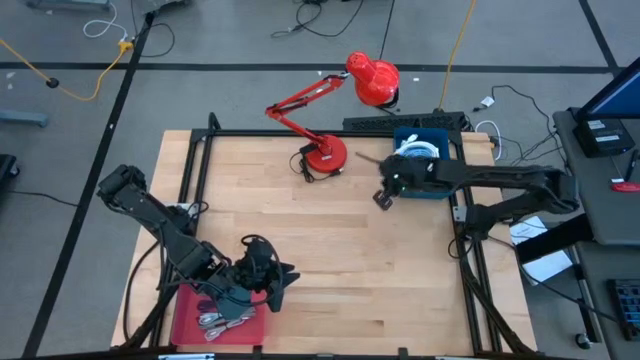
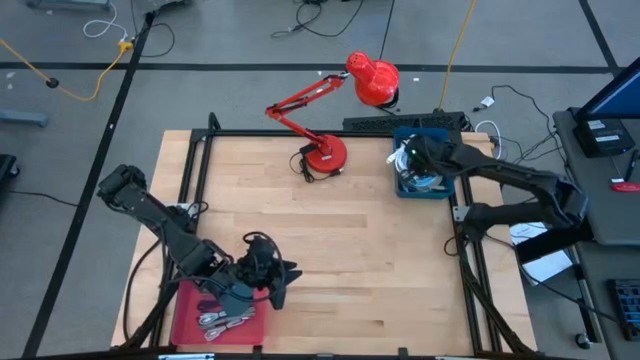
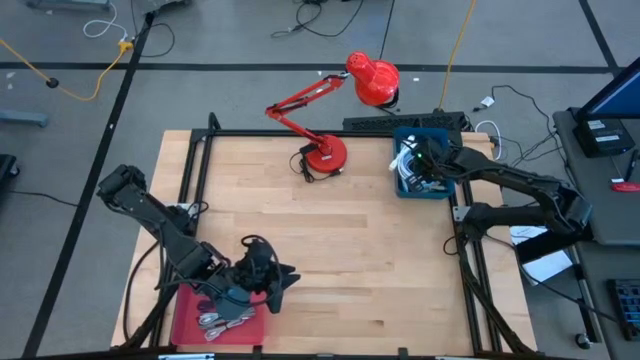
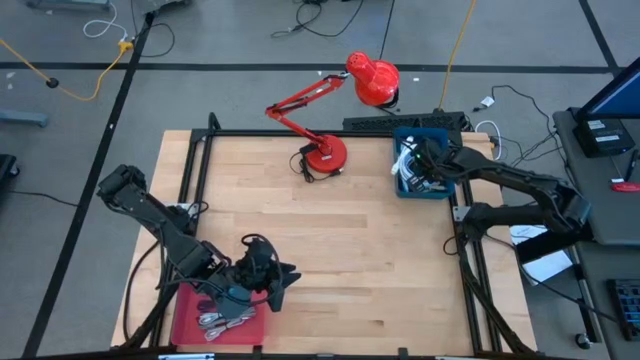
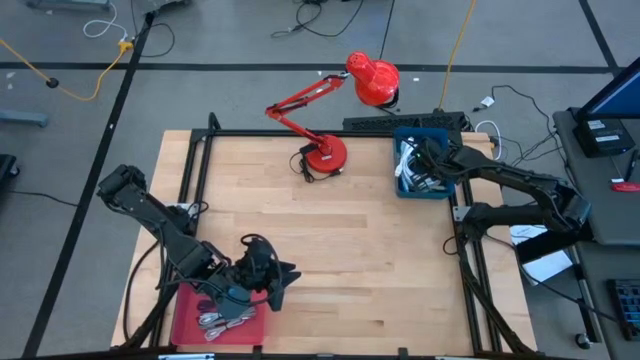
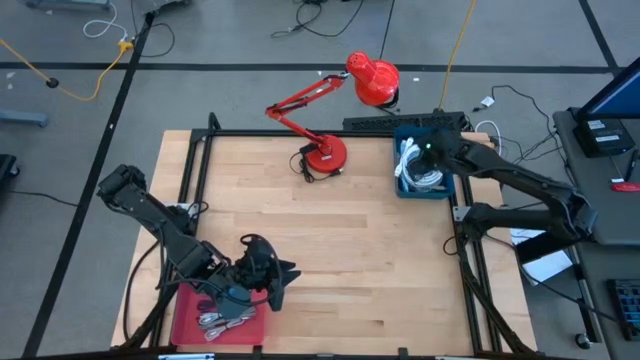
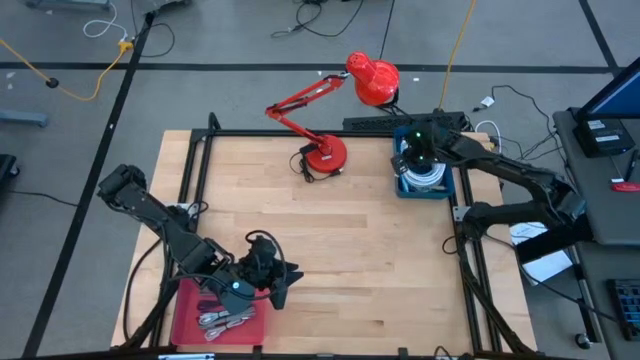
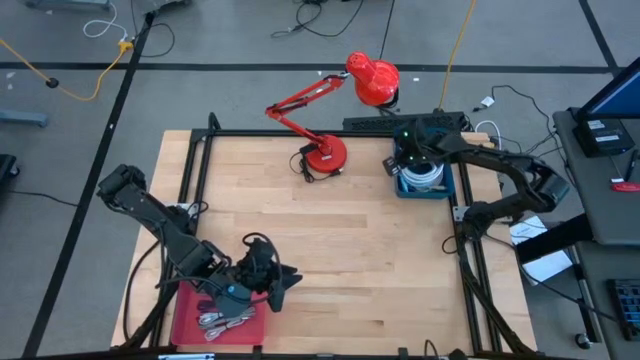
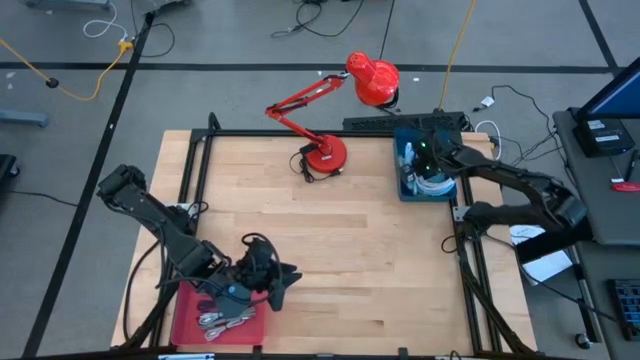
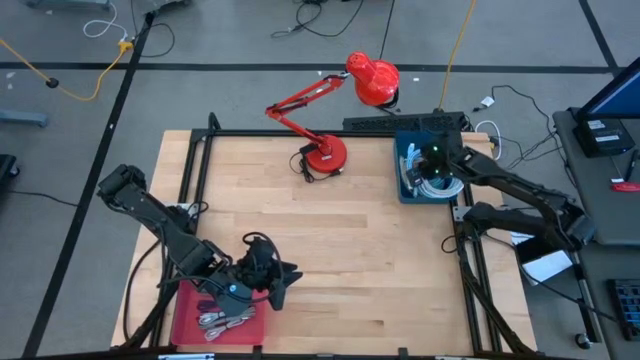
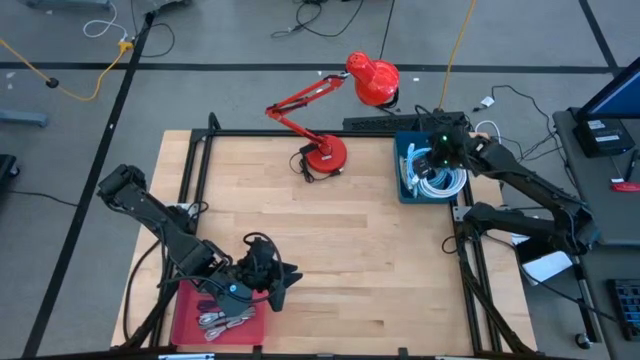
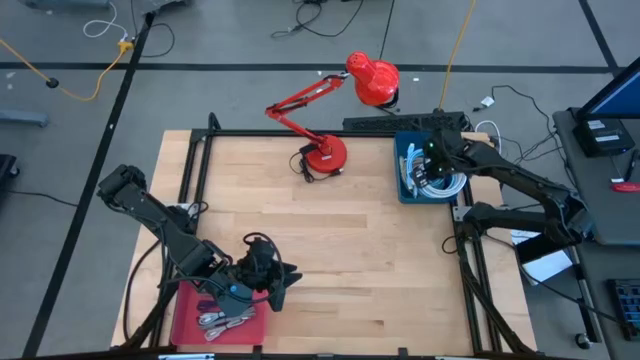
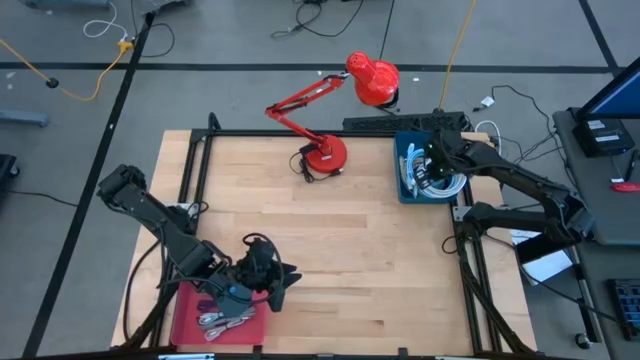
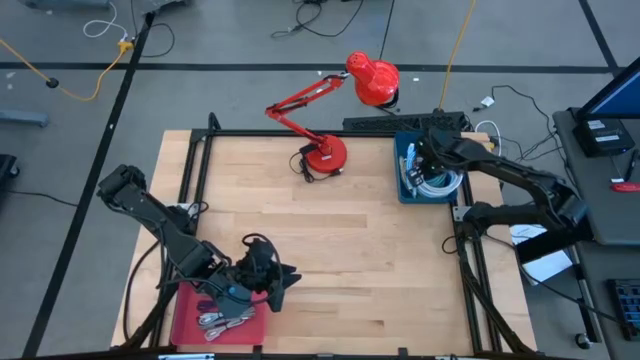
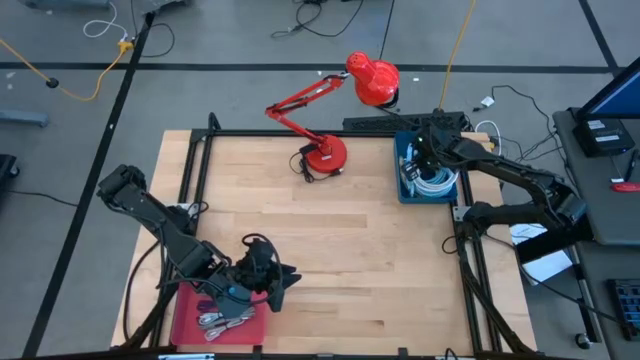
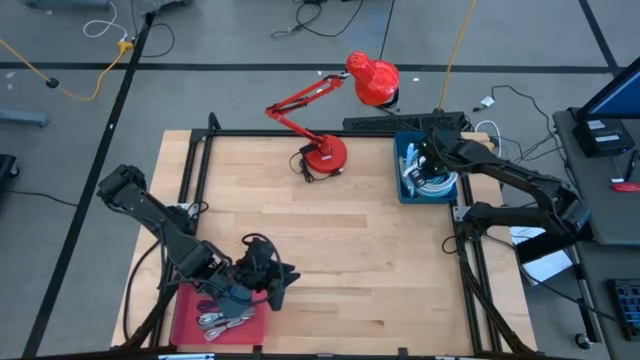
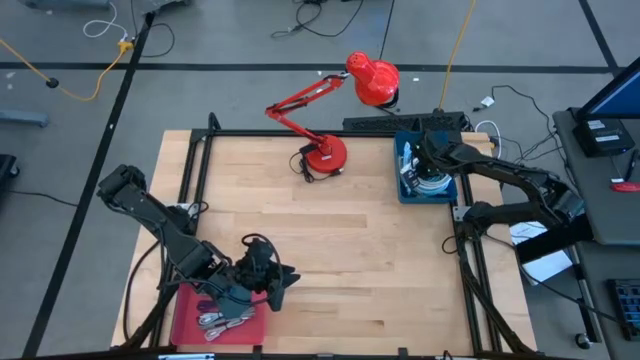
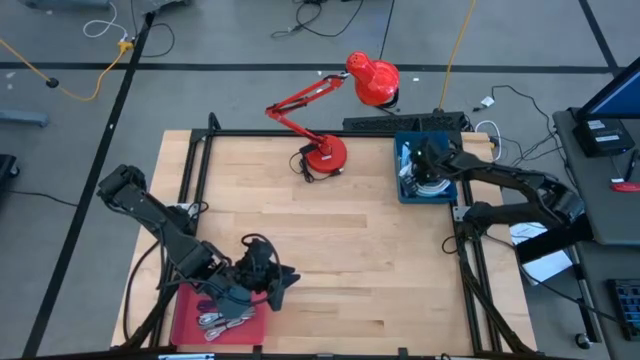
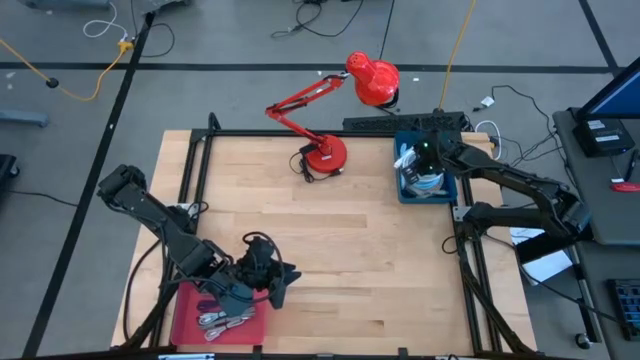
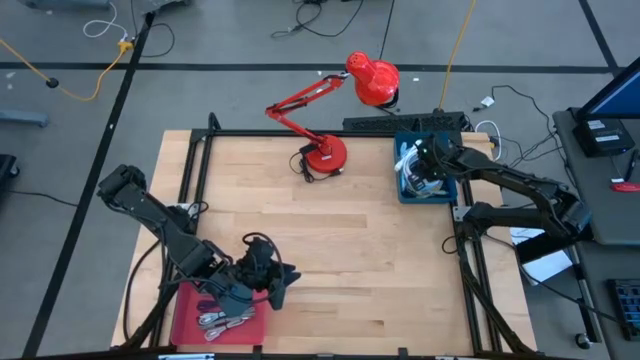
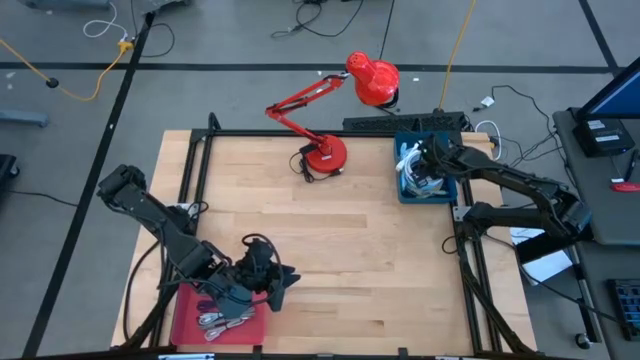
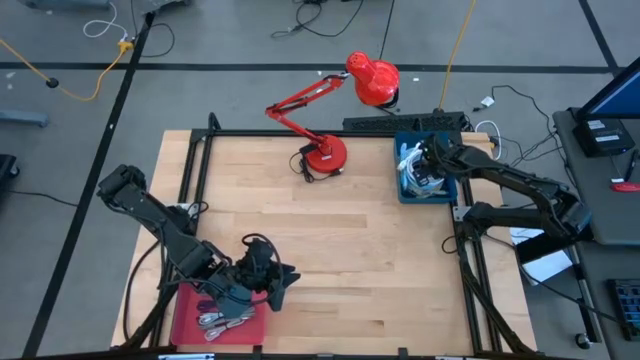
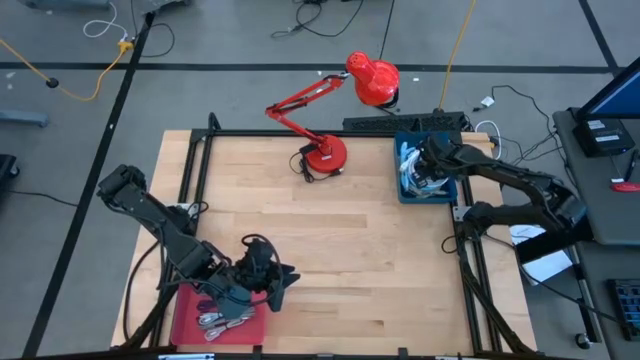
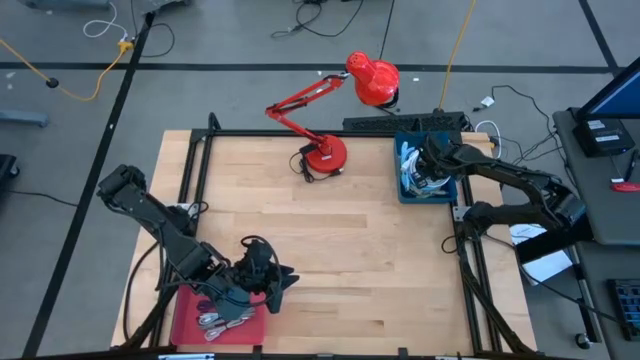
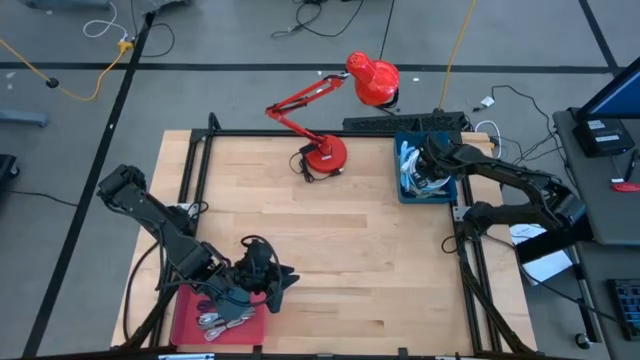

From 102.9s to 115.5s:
Task: Sort cables
Adjust the usb cables in the blue bin

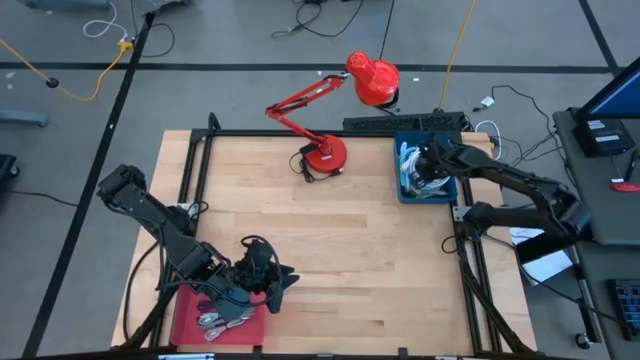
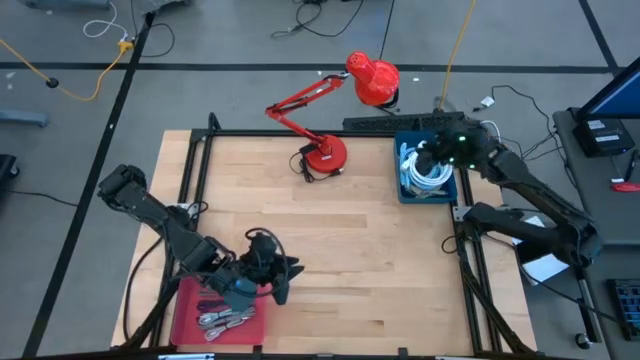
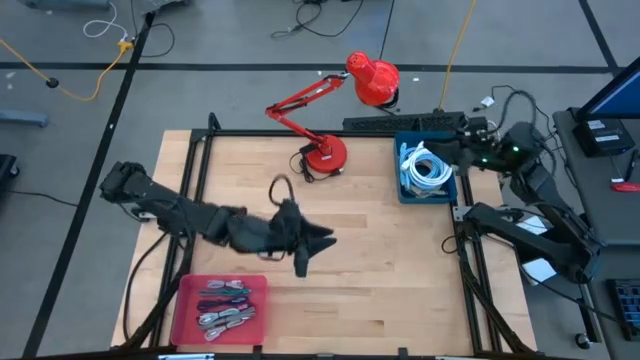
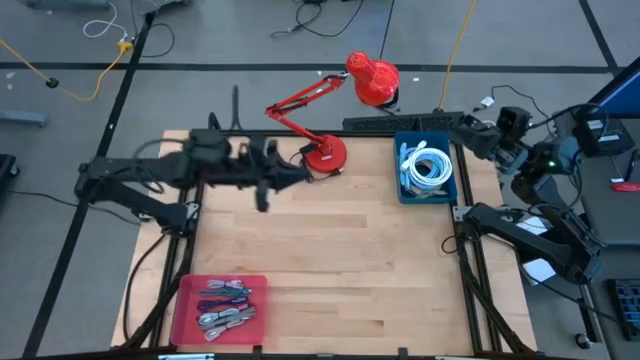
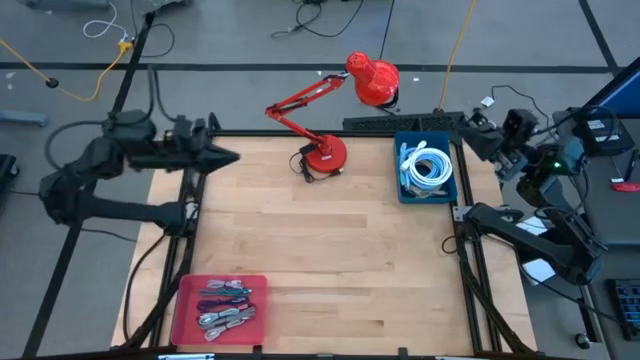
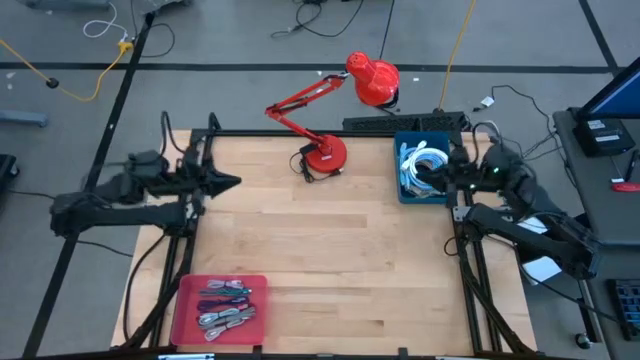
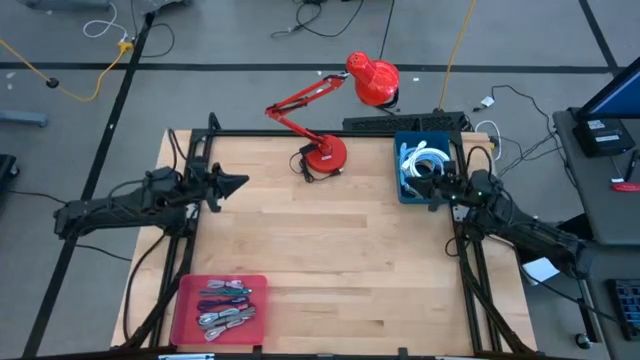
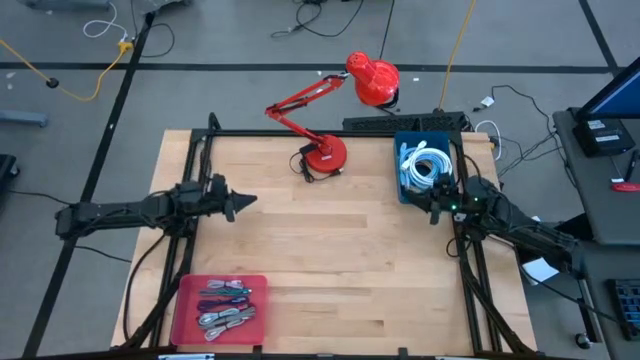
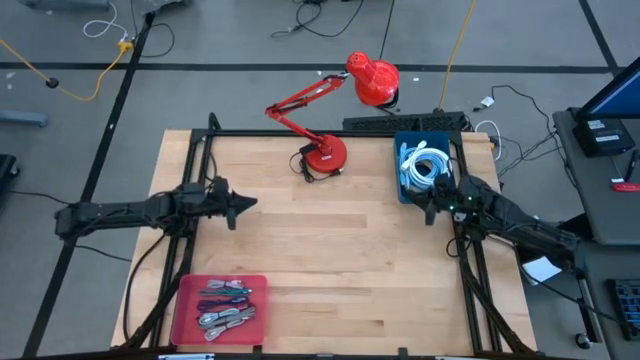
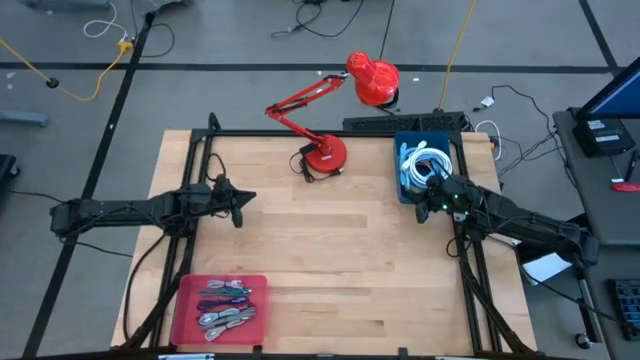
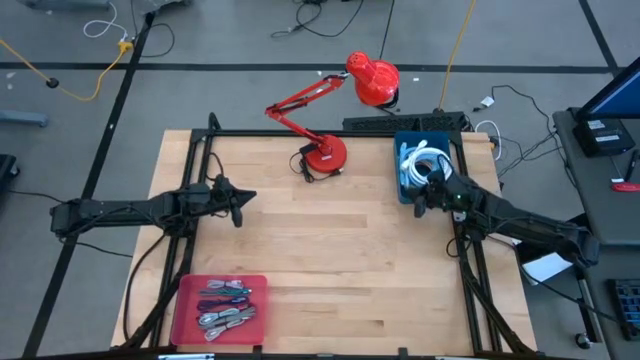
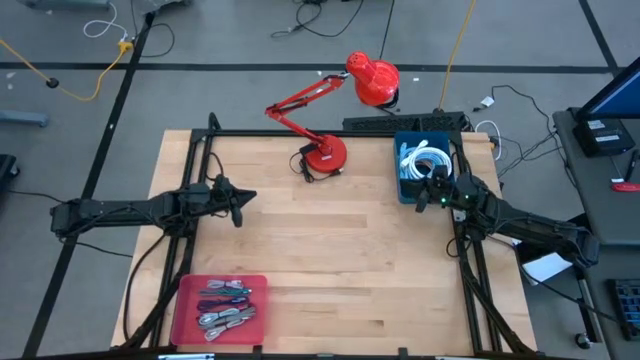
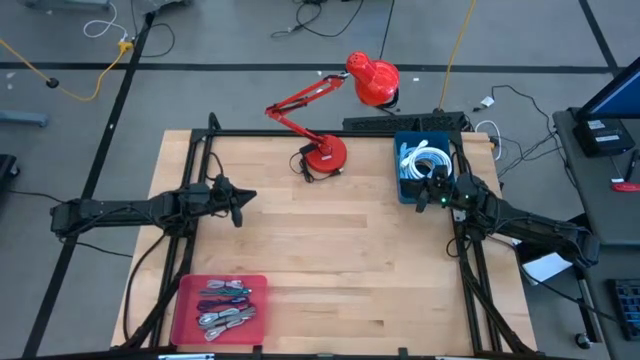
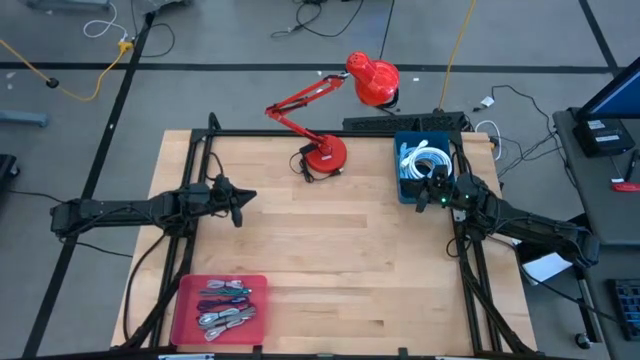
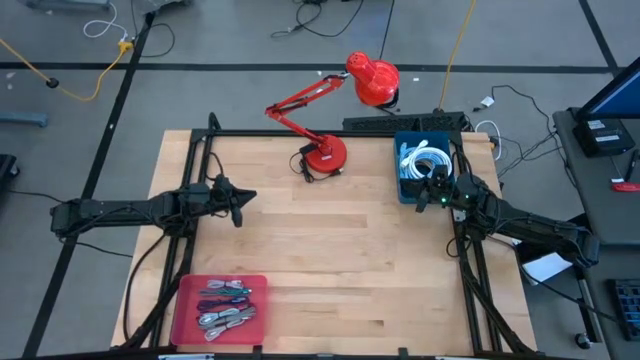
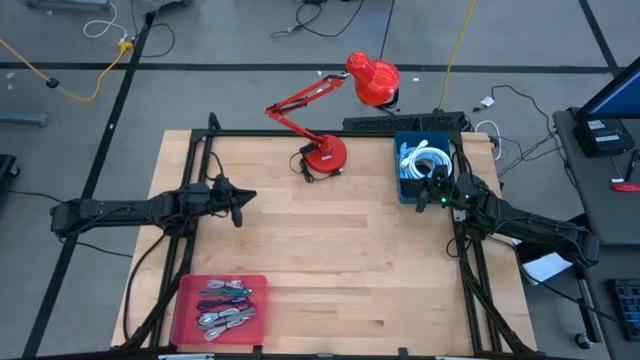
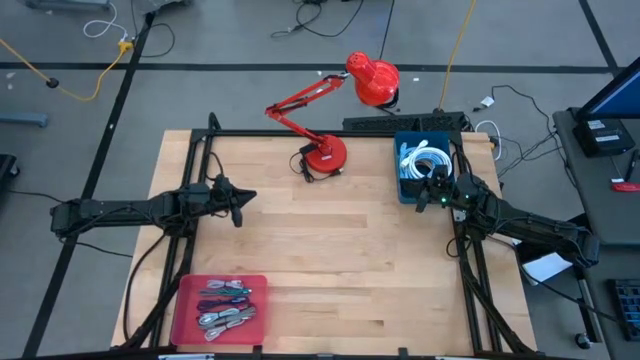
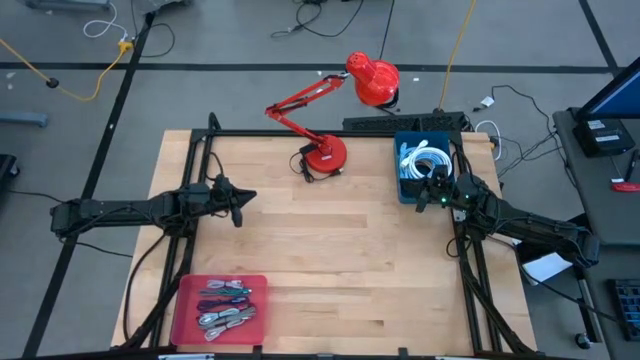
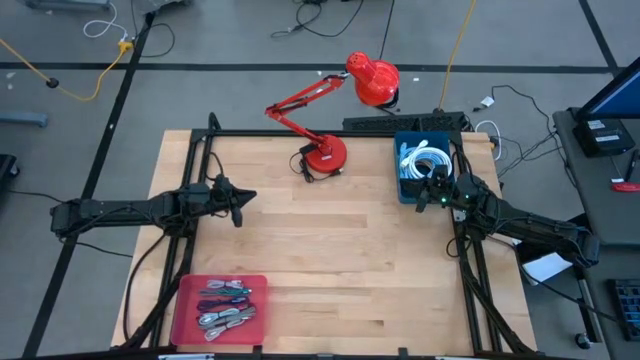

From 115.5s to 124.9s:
Return to Home Position
